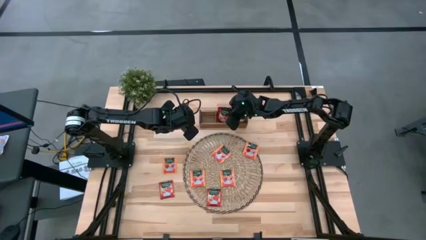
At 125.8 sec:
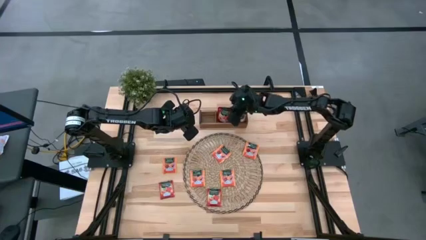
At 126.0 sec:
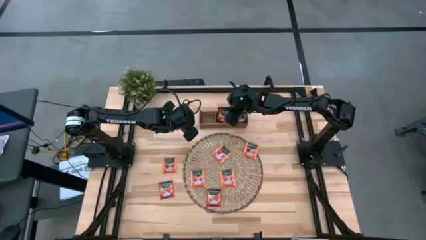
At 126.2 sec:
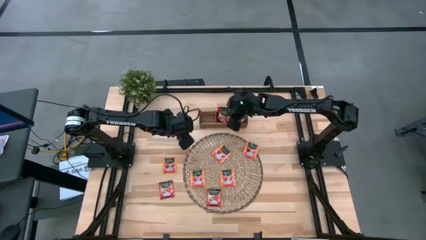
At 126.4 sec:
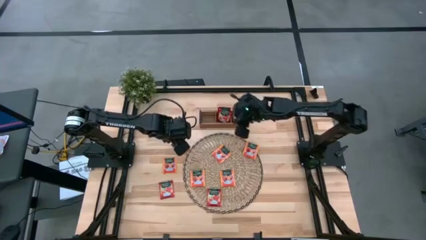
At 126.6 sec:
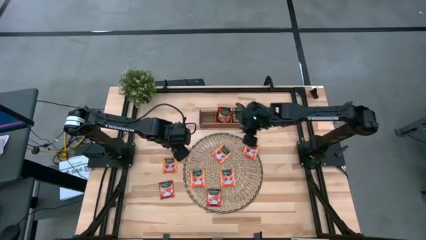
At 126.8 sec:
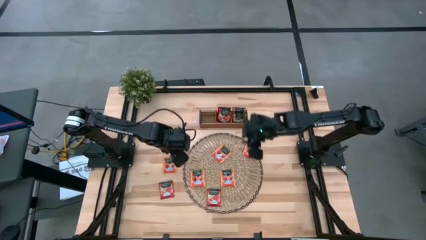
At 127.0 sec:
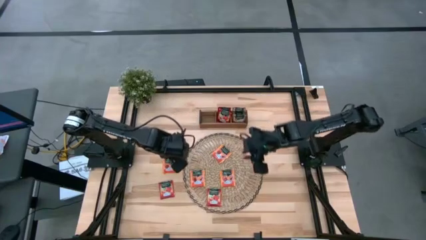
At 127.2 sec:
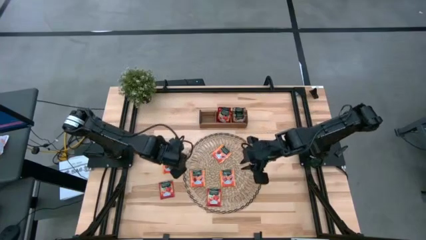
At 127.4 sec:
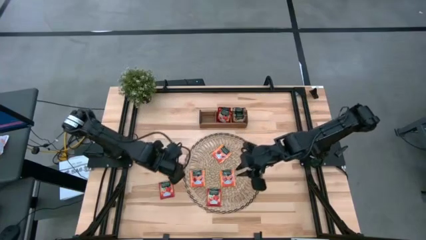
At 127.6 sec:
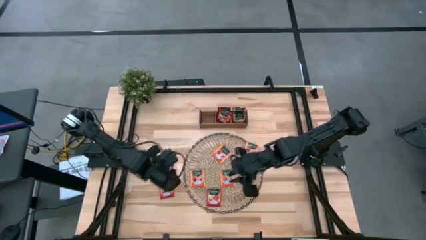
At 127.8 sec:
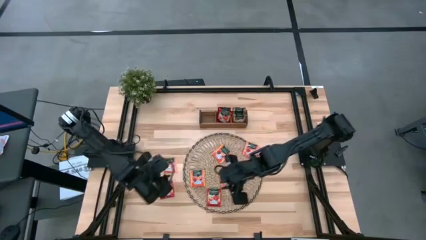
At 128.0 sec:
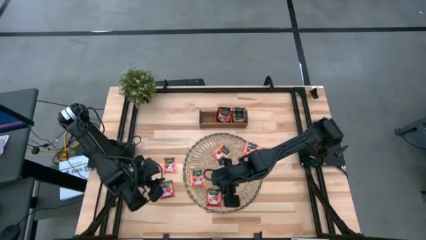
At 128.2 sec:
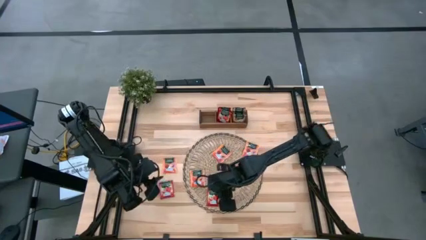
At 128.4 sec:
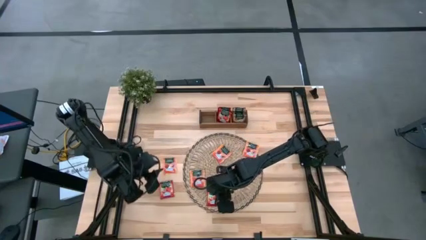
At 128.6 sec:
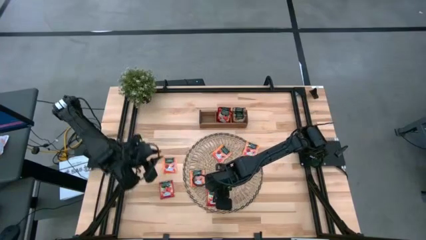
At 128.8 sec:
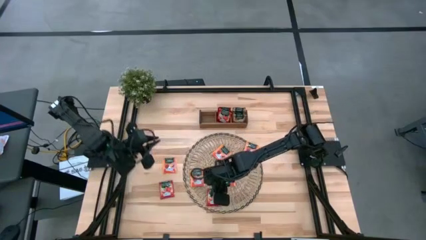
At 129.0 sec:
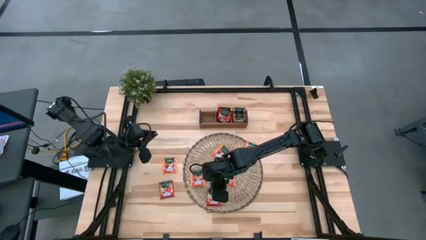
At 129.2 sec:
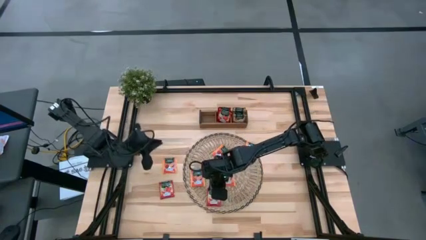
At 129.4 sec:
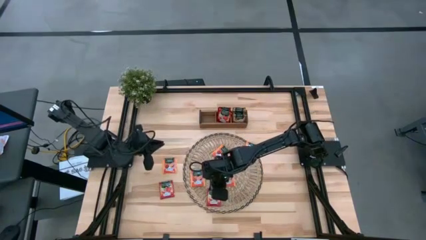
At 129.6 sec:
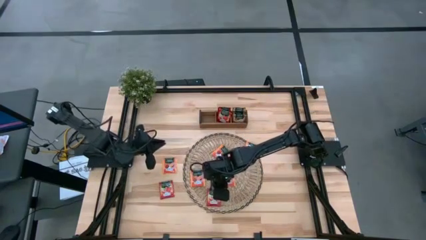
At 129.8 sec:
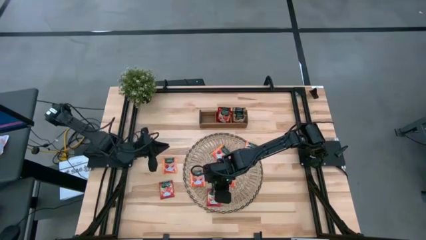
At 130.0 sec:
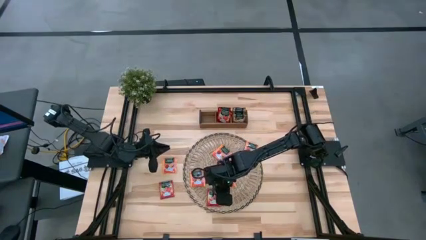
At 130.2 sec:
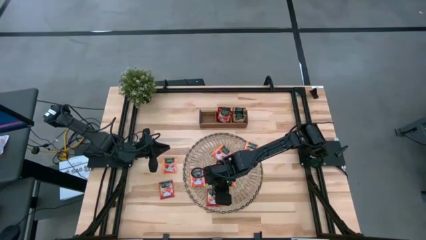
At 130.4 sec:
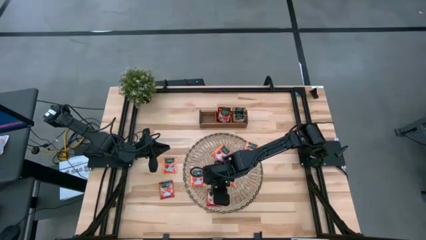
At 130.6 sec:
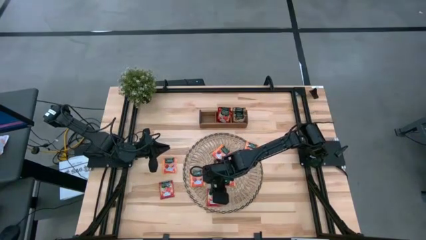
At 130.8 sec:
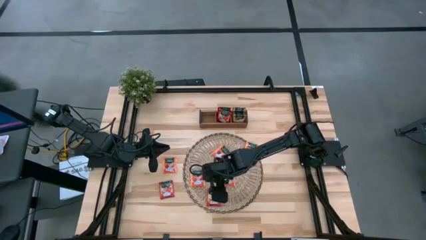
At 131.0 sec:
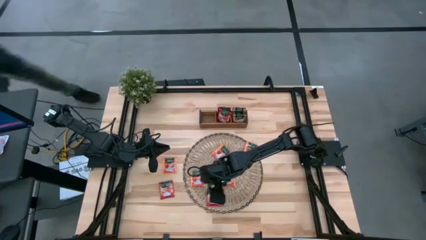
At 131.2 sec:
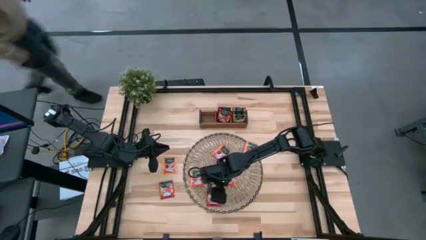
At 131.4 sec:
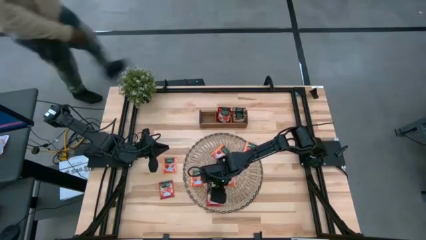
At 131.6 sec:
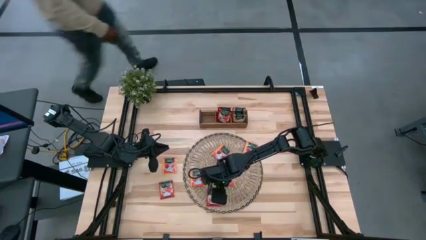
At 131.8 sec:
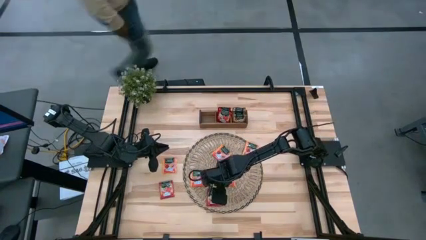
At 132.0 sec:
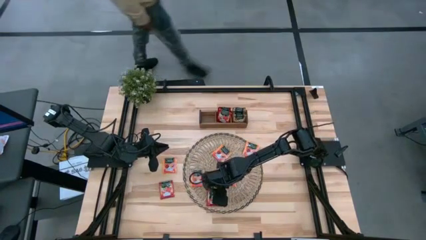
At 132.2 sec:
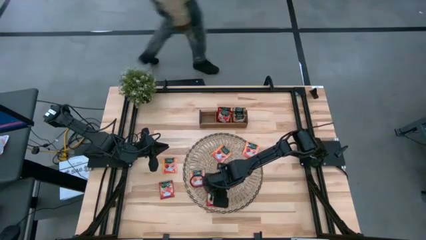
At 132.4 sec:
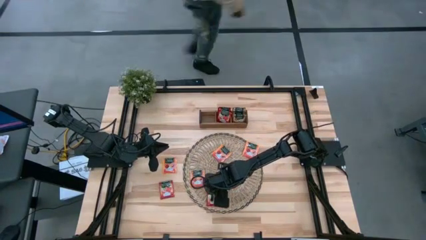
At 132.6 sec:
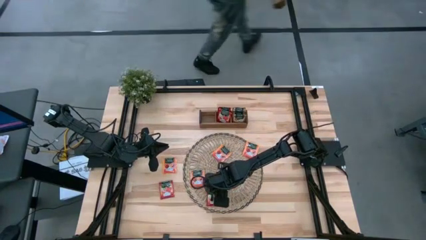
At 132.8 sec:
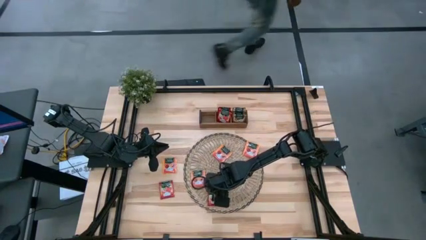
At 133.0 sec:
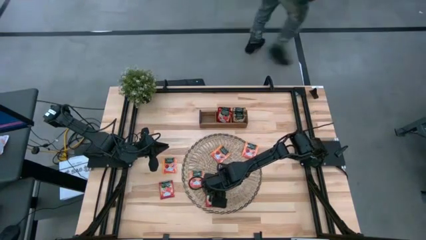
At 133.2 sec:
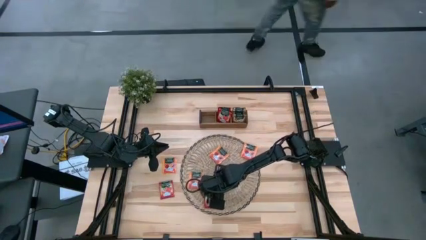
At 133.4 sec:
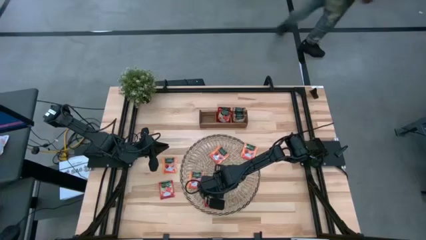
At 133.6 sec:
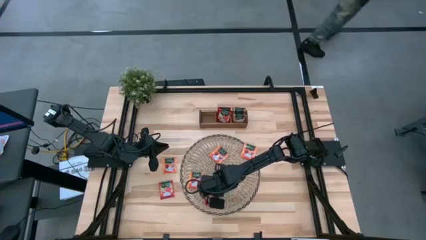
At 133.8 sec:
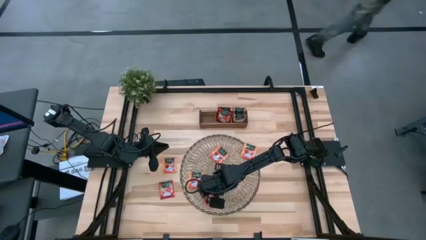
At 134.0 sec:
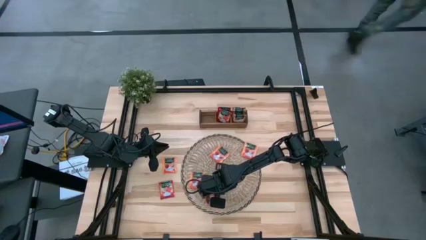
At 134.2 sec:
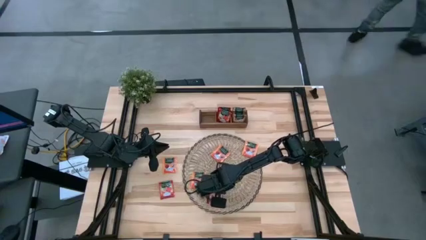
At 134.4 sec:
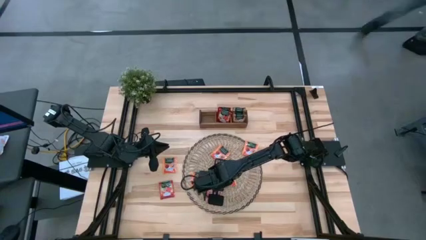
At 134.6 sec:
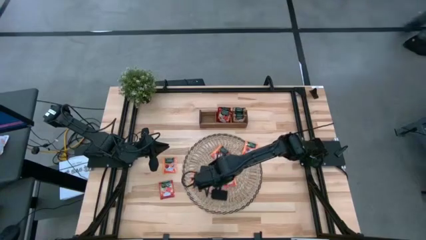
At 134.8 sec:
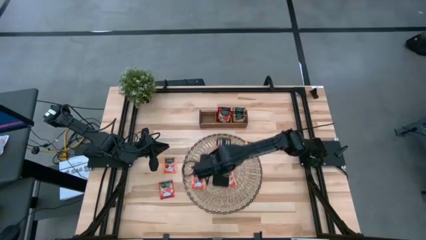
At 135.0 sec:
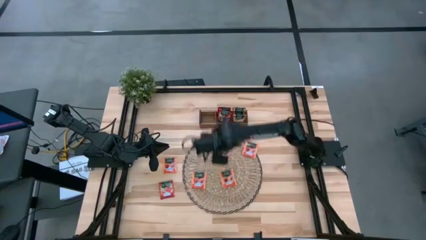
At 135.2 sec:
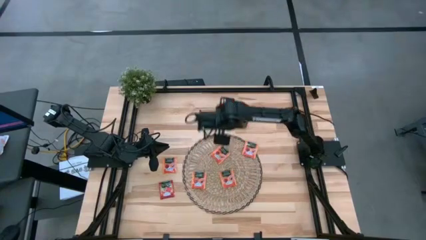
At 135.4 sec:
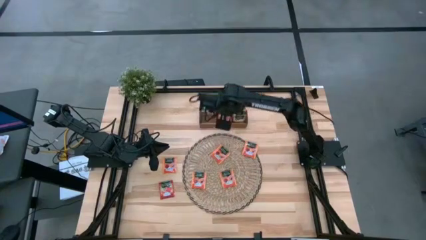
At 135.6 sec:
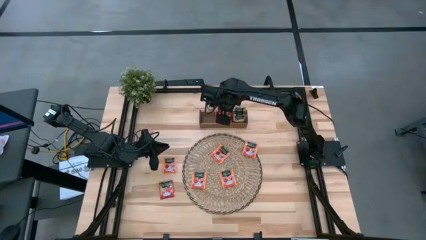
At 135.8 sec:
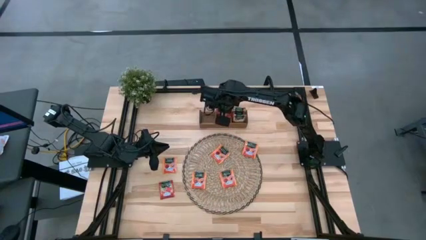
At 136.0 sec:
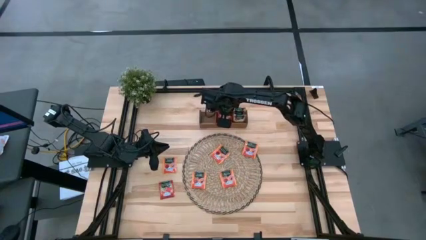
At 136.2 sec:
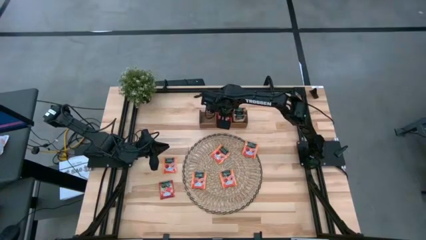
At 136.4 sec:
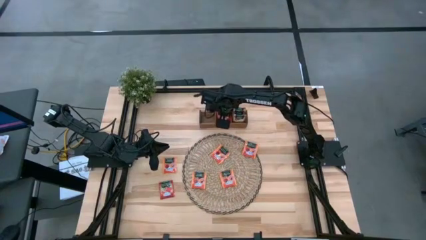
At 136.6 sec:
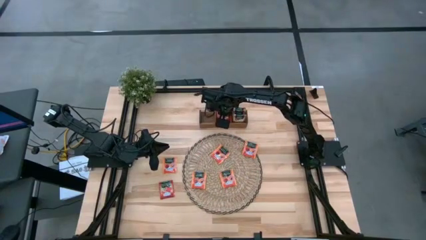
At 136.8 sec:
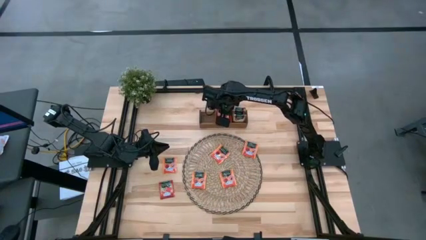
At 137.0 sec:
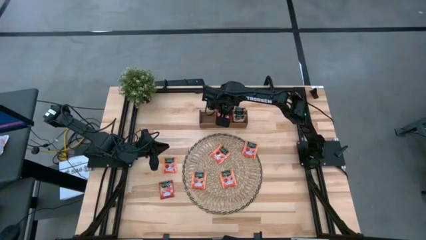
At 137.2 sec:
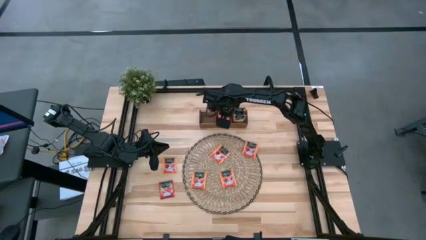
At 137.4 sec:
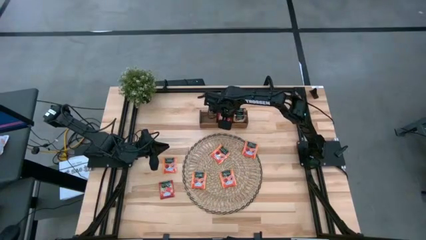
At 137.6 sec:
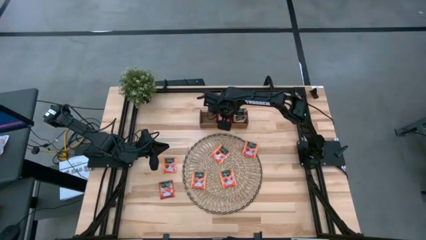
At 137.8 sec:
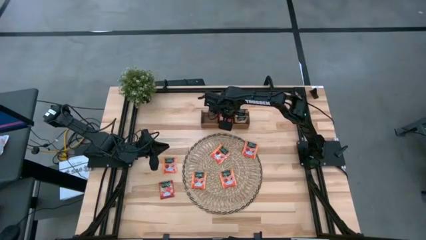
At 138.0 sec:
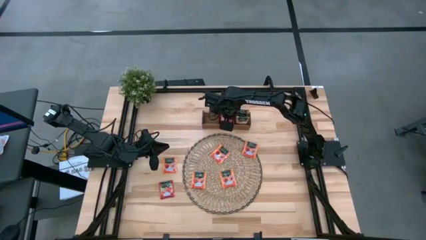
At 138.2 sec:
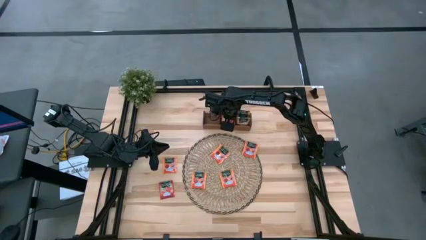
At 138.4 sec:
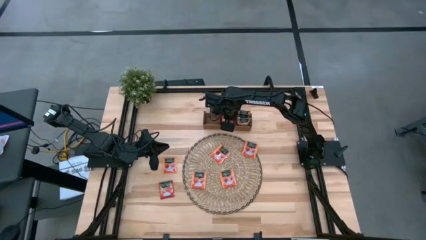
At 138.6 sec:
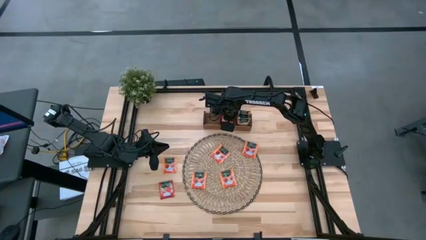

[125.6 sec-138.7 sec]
Task: Pick & Place Tea
Put the red tea bag into the middle section of the wooden organizer
